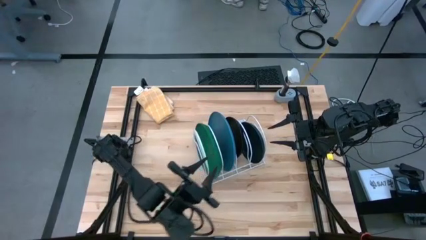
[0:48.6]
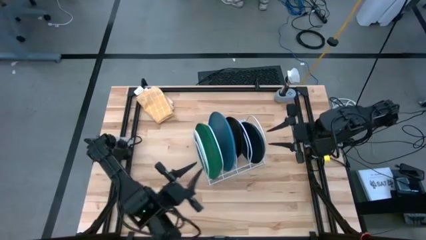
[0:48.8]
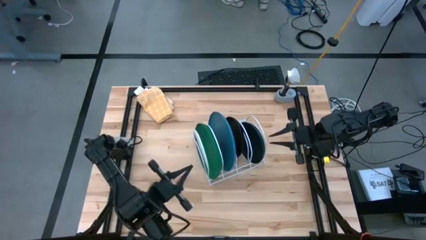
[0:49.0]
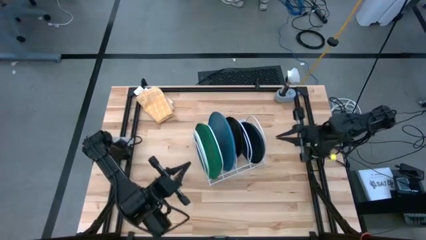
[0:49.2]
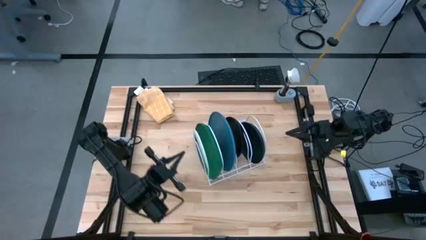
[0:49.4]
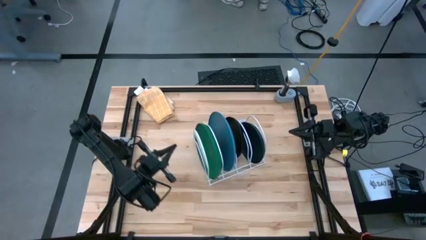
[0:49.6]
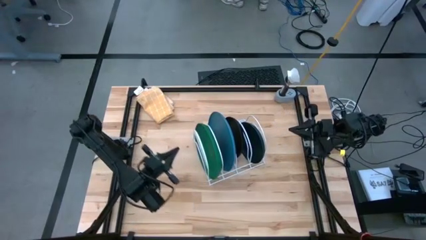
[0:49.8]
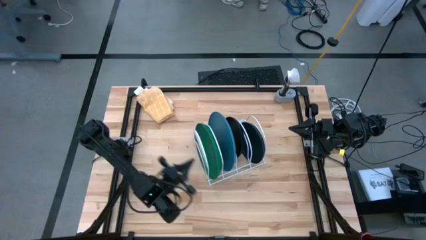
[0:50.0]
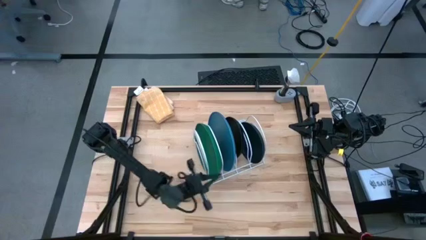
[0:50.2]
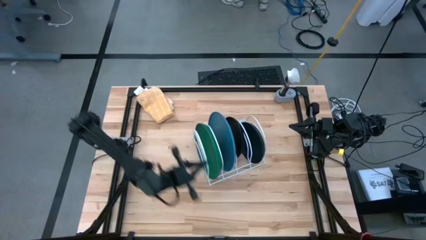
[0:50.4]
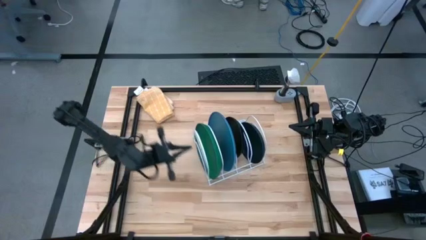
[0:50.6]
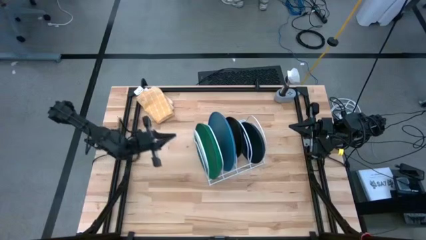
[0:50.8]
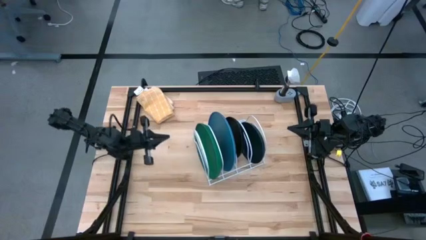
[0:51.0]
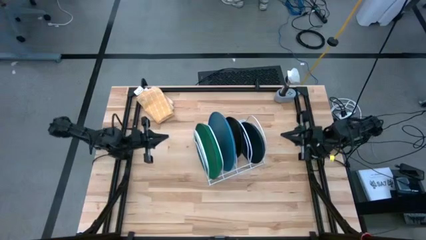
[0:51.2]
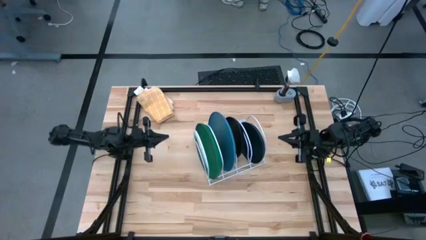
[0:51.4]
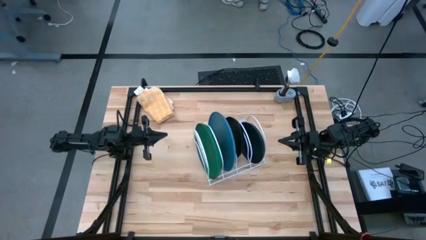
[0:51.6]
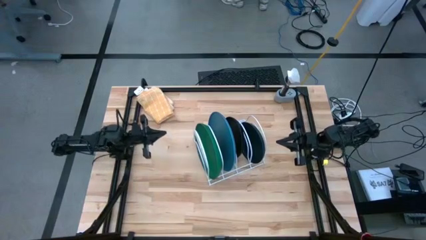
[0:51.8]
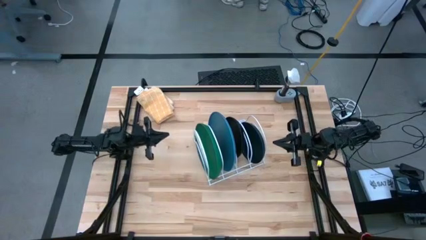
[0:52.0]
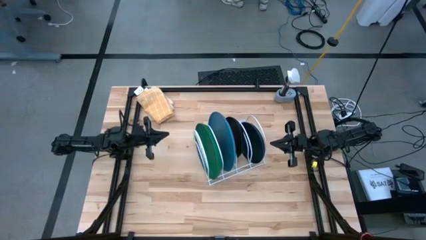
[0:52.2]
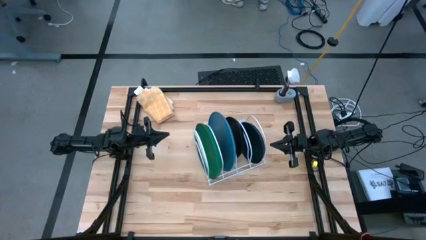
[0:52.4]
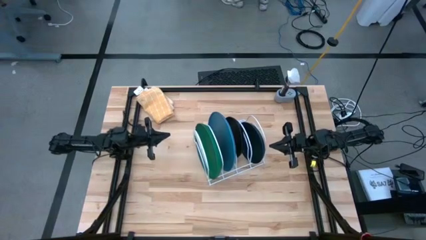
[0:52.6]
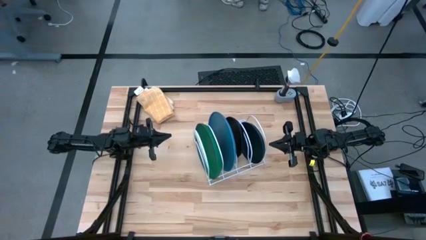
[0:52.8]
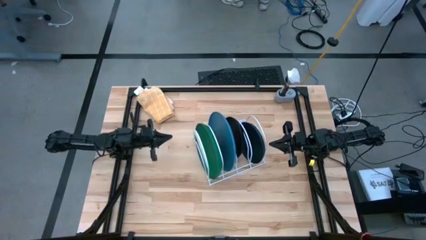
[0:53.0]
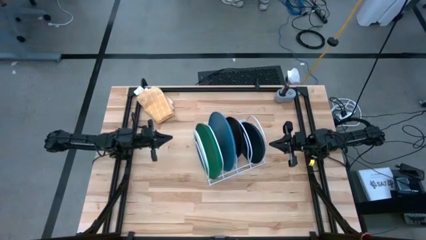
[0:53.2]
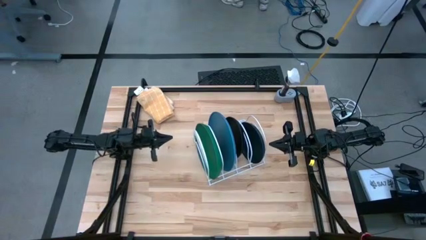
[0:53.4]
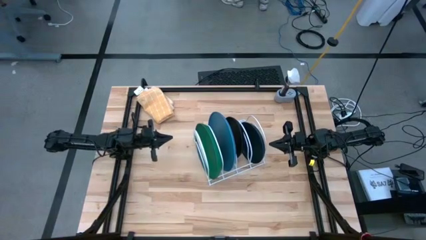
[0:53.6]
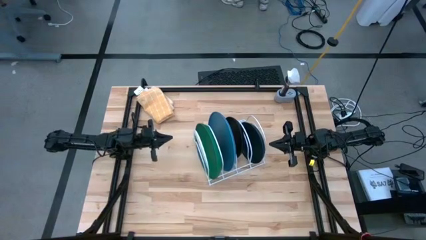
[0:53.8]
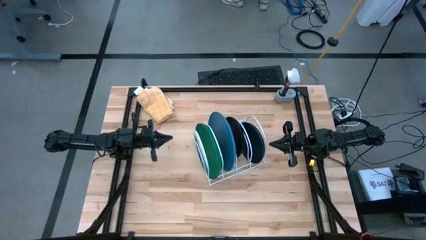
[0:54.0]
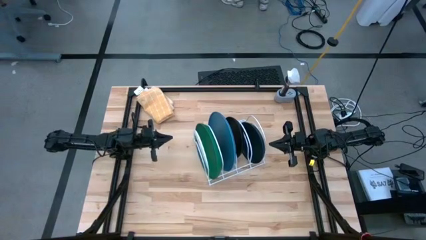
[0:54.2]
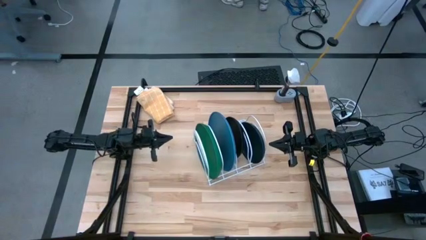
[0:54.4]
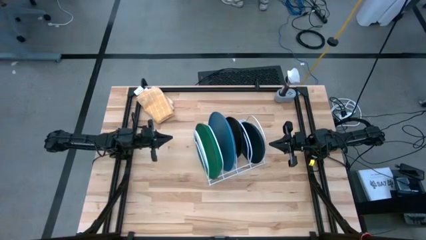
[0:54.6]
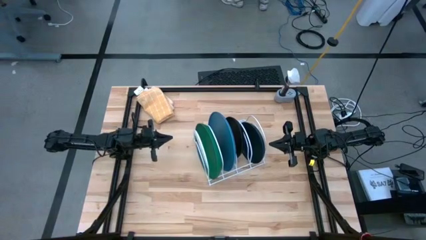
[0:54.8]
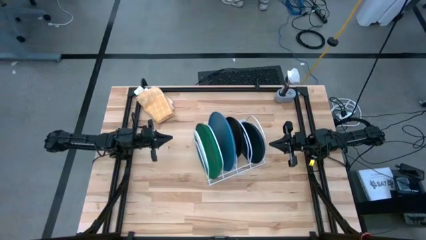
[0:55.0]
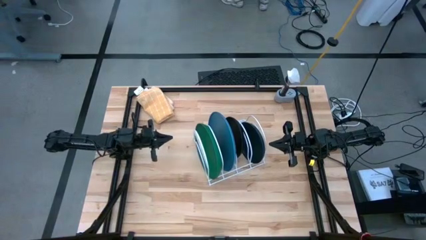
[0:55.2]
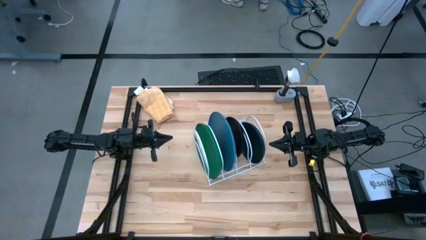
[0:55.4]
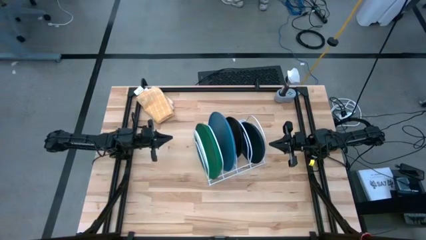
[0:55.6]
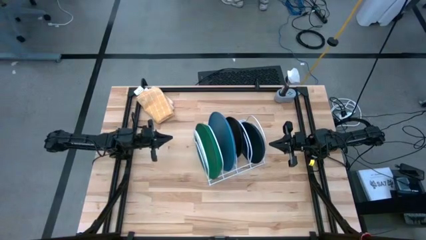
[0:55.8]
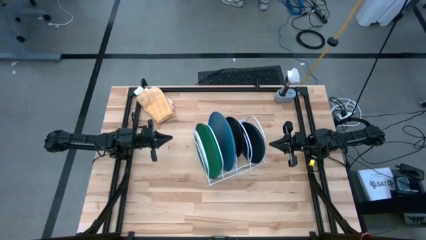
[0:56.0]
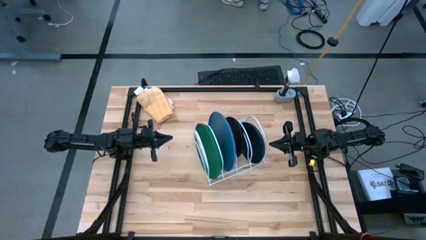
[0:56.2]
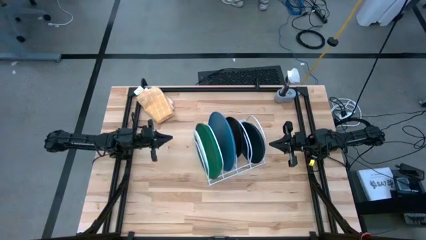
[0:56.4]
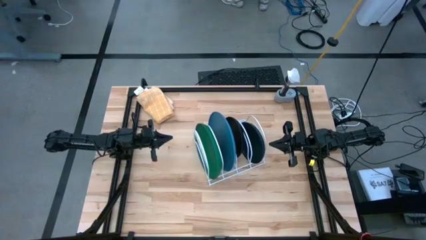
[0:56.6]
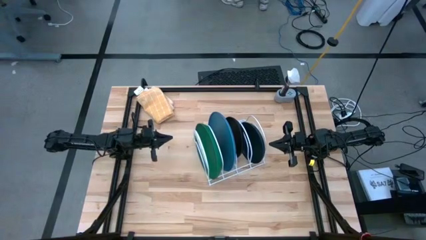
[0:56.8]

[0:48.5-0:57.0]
Task: Sort dishes
Return to Home Position

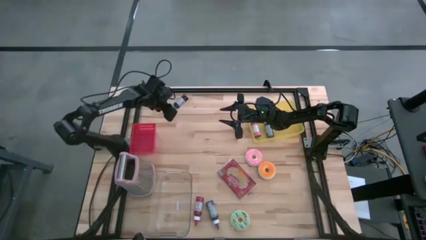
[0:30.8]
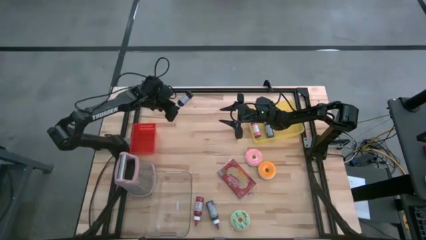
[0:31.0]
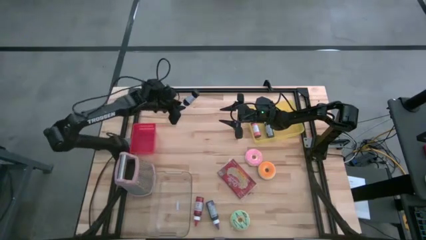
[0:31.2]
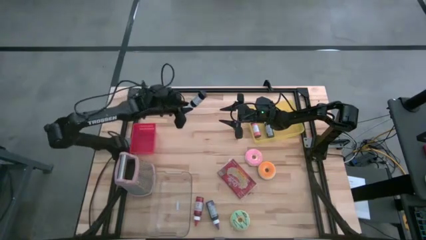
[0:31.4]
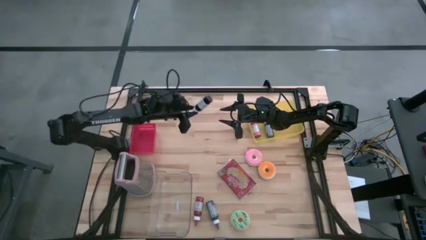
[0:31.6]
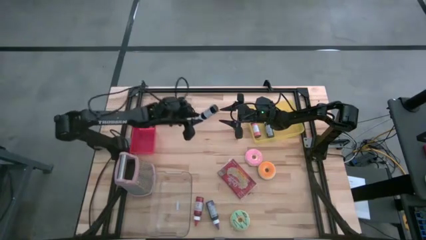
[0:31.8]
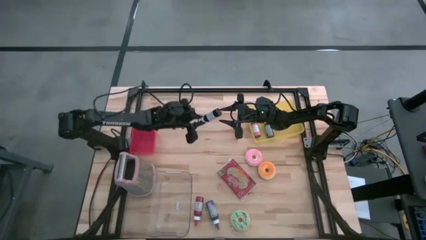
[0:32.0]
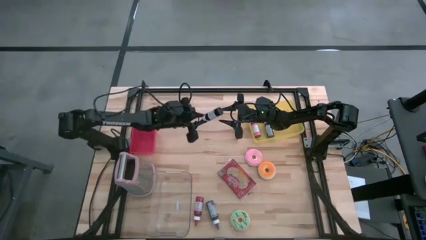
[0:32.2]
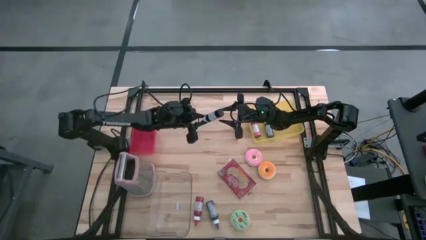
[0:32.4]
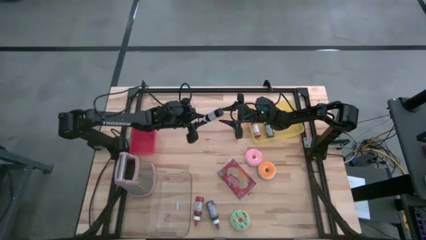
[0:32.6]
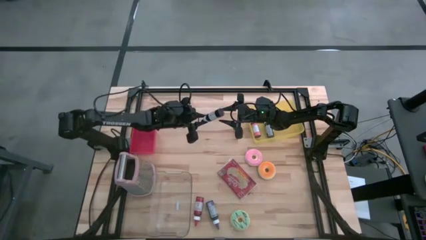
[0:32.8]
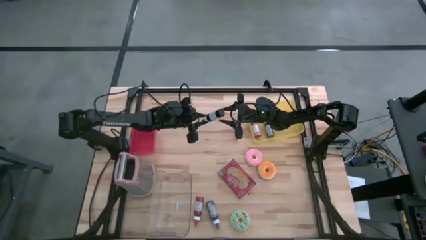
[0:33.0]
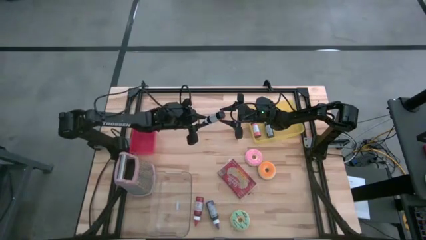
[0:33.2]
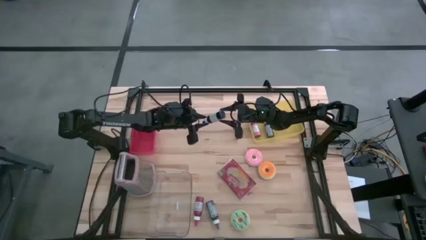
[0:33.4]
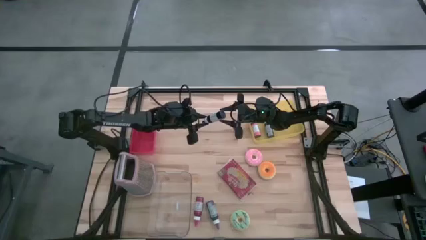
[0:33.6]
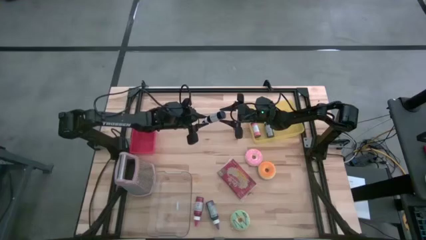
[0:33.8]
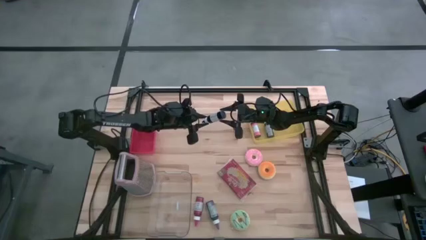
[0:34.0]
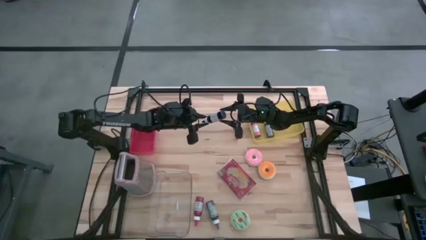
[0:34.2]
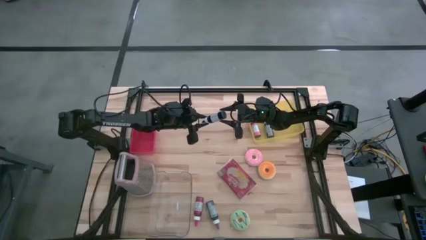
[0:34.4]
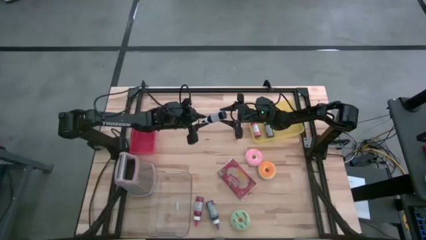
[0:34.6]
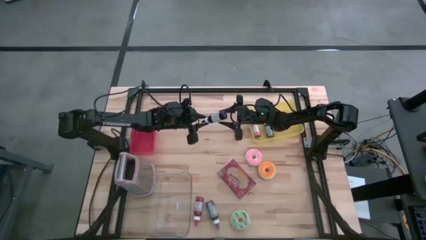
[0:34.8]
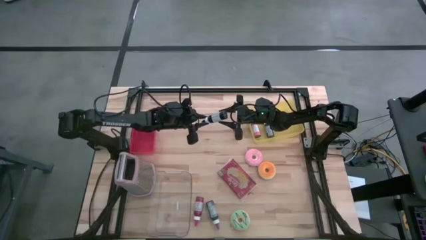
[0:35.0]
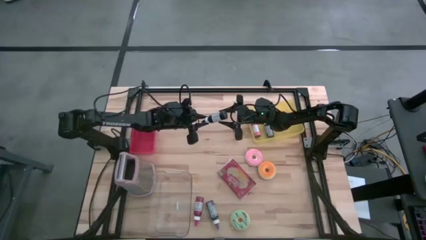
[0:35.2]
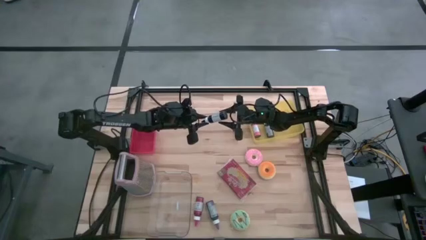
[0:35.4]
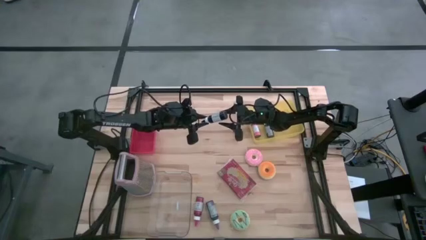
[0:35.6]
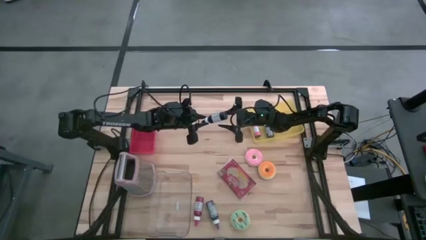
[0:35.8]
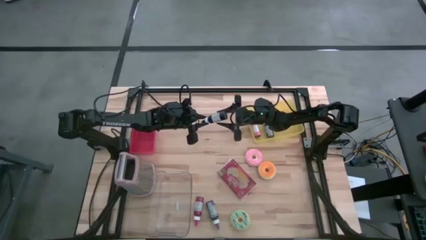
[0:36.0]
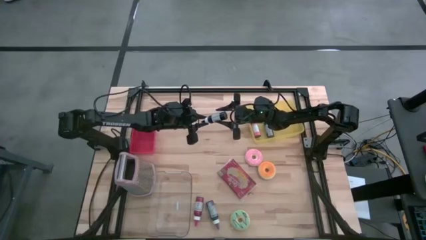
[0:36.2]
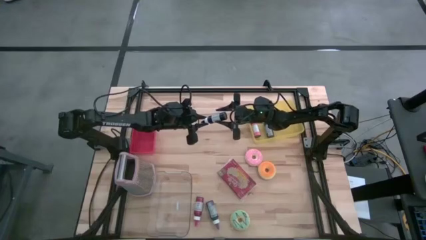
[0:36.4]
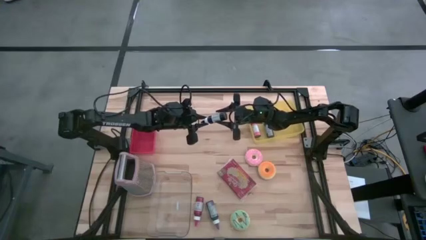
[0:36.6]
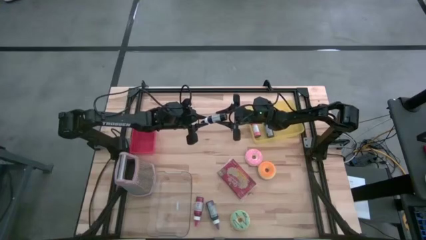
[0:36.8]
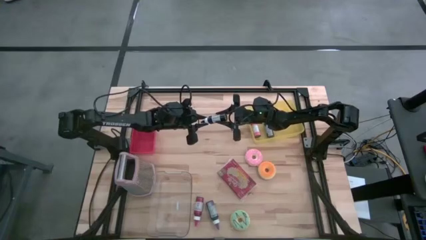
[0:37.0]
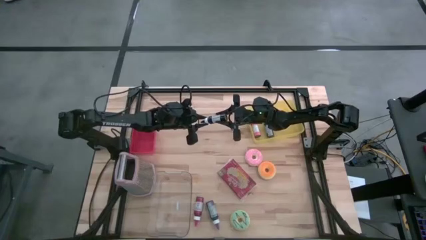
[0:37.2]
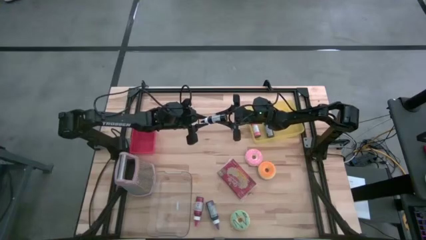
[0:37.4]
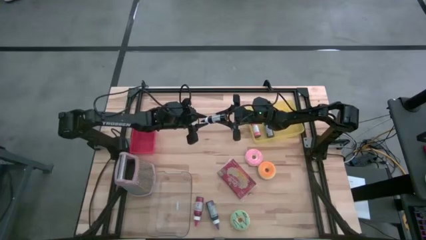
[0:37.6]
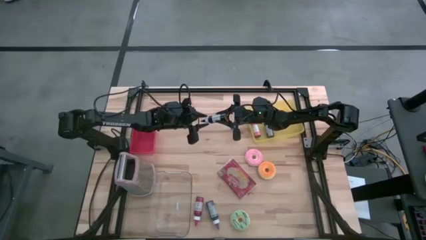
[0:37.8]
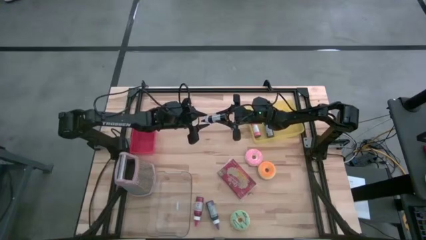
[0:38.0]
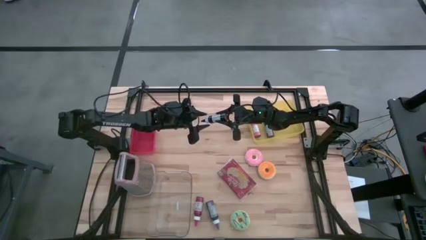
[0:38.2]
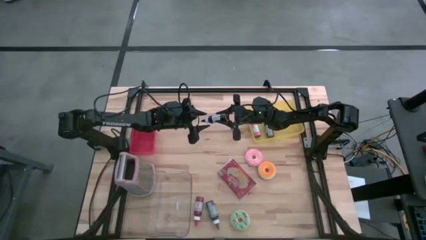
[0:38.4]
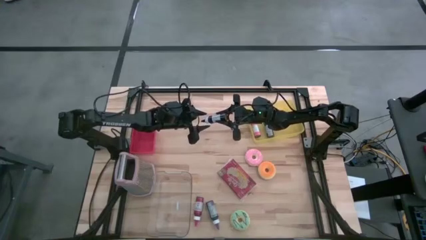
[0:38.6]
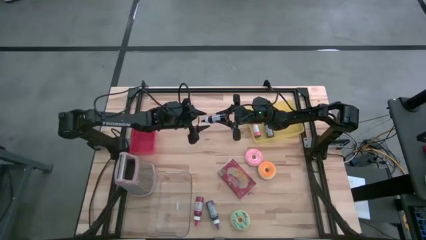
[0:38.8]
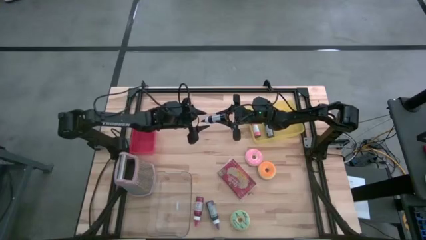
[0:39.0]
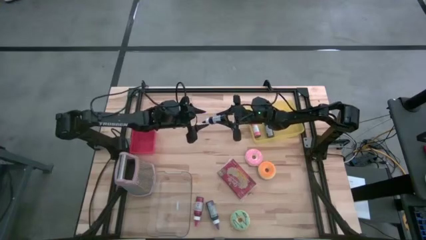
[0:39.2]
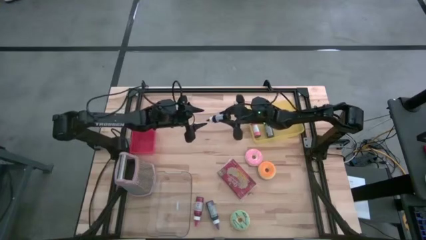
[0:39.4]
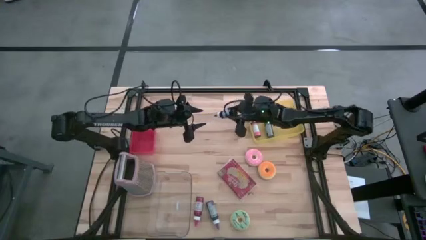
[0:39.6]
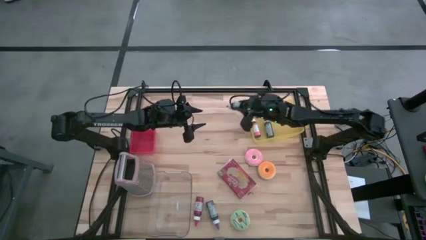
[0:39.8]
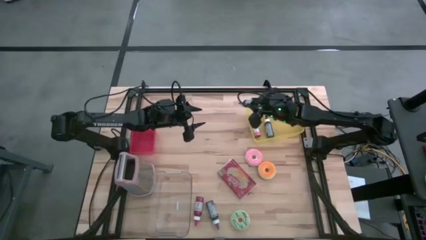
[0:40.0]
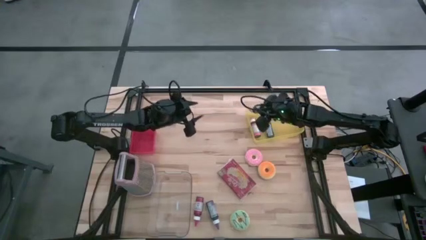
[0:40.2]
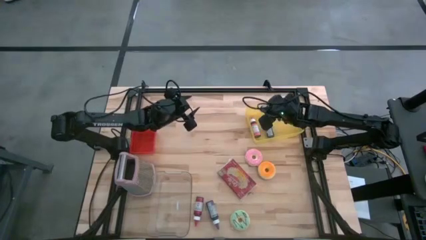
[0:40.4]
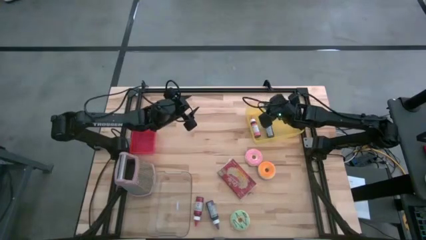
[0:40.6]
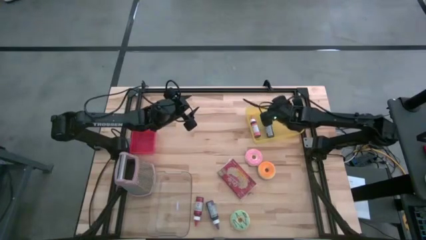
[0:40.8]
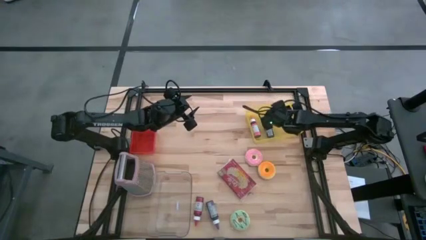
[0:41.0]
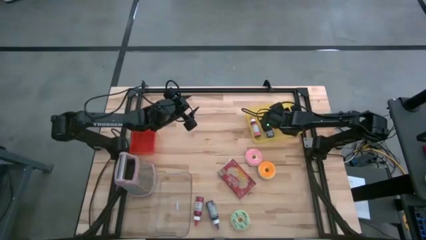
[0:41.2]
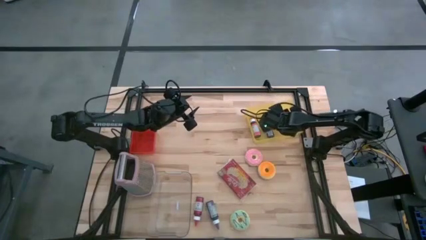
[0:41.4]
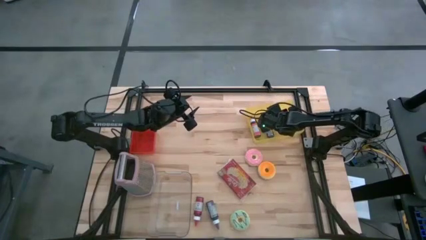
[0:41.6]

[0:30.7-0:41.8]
Task: Pick & Place Food Item
Put the black food coloring bottle into the yellow bin
